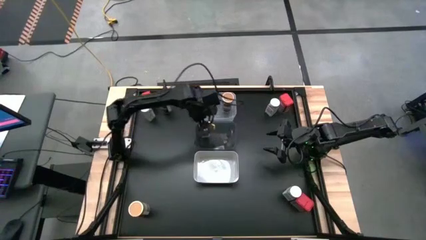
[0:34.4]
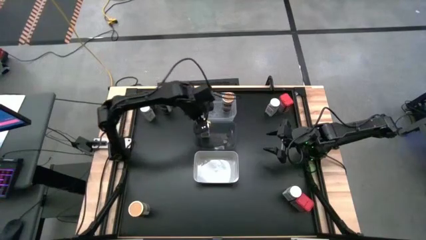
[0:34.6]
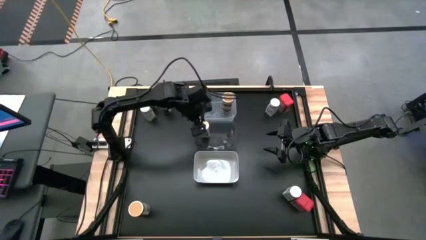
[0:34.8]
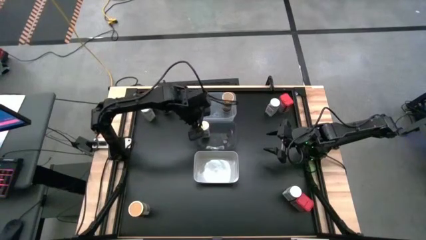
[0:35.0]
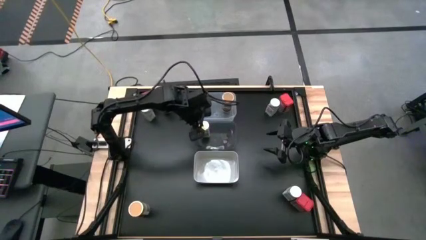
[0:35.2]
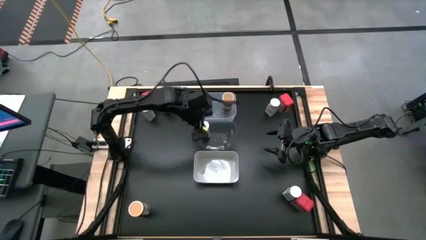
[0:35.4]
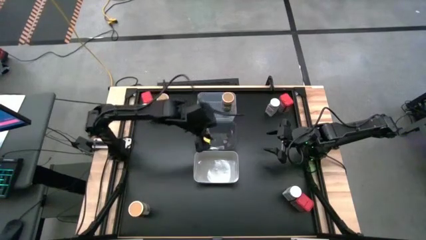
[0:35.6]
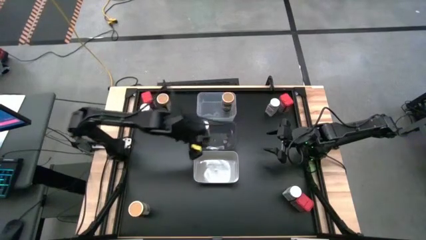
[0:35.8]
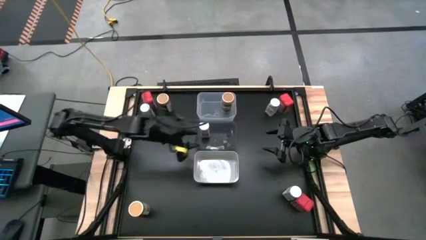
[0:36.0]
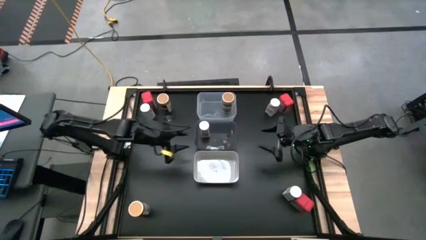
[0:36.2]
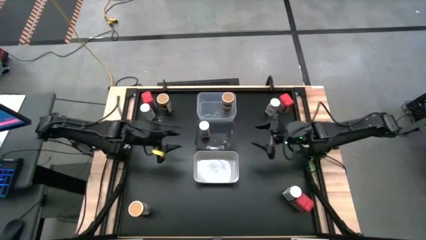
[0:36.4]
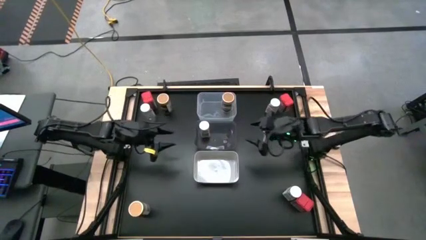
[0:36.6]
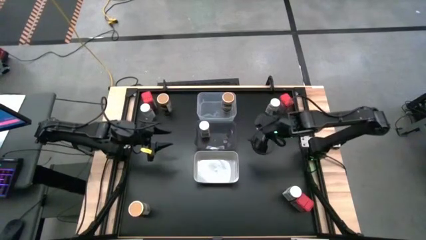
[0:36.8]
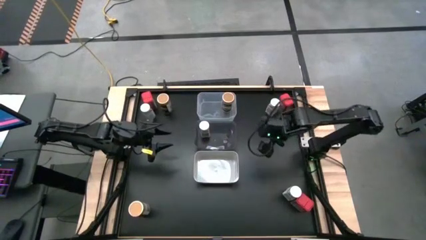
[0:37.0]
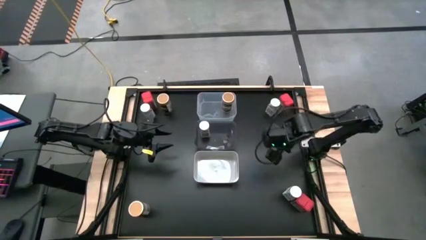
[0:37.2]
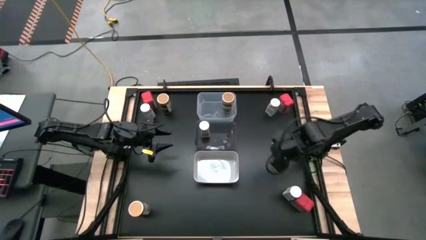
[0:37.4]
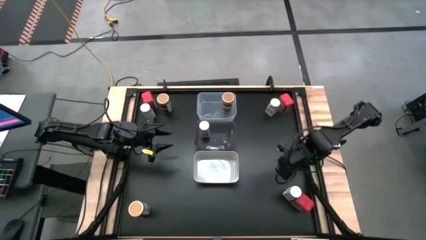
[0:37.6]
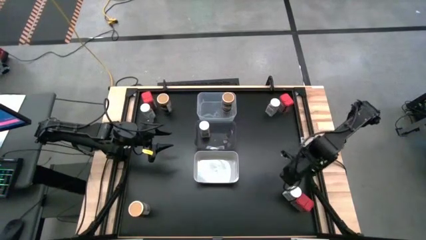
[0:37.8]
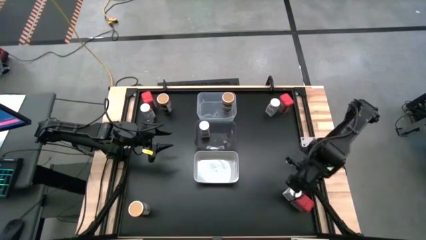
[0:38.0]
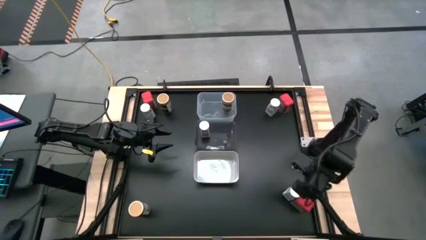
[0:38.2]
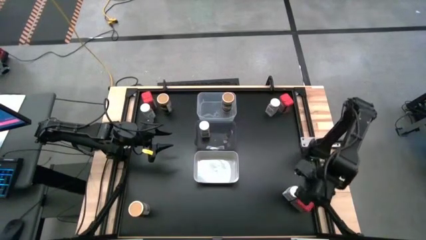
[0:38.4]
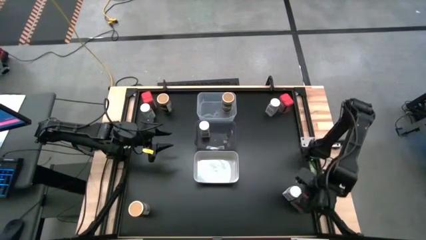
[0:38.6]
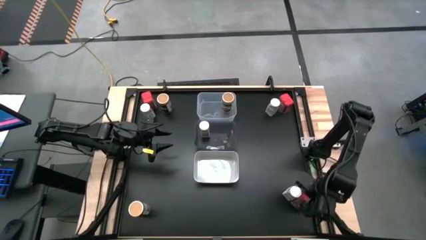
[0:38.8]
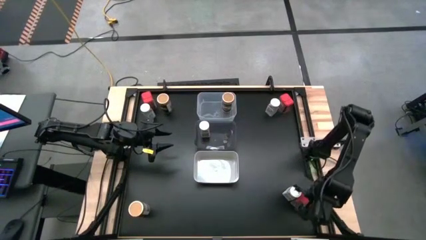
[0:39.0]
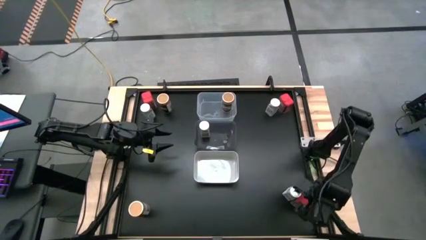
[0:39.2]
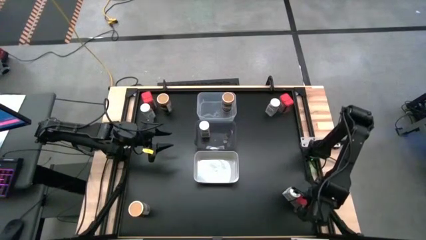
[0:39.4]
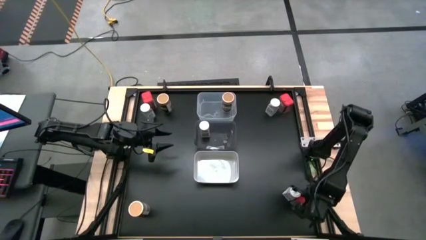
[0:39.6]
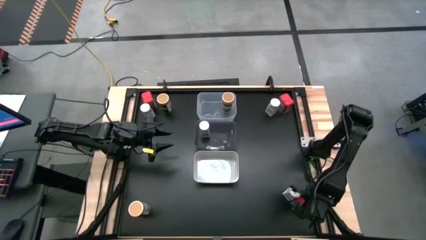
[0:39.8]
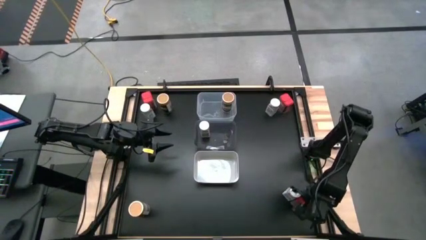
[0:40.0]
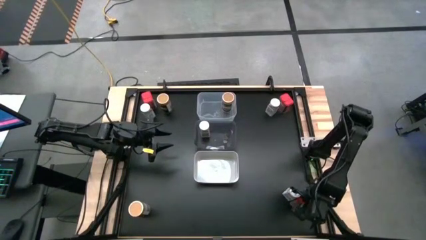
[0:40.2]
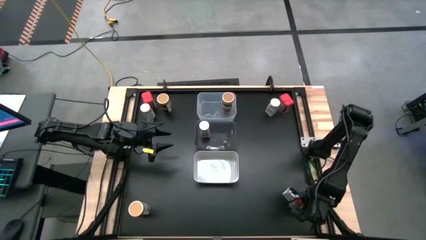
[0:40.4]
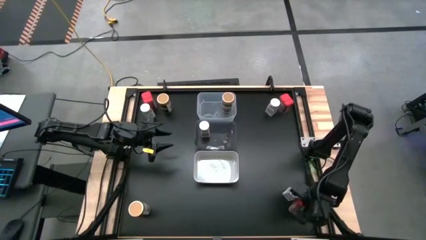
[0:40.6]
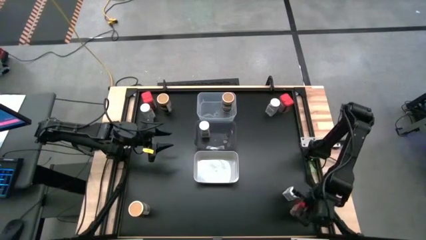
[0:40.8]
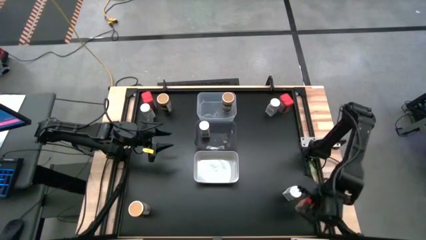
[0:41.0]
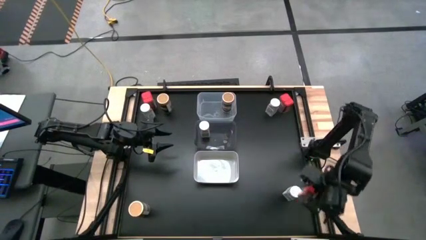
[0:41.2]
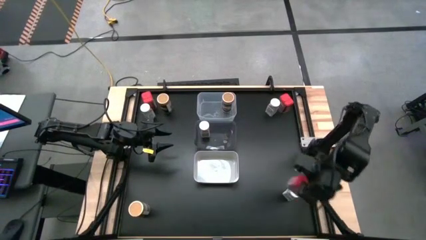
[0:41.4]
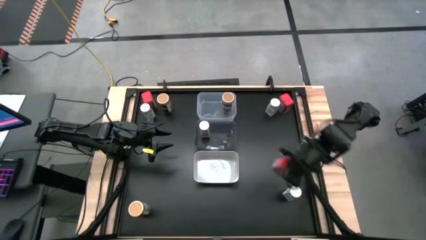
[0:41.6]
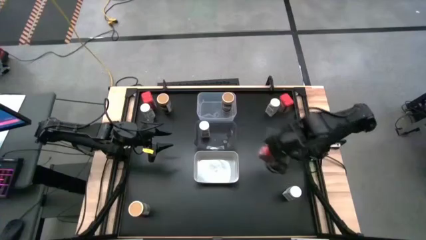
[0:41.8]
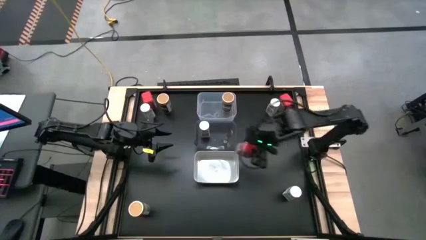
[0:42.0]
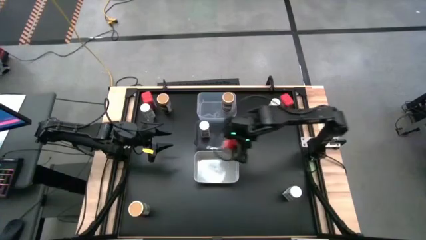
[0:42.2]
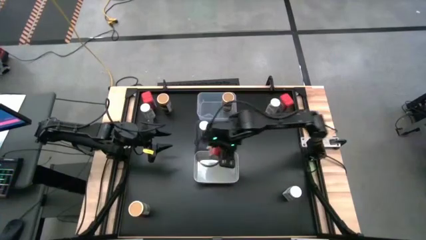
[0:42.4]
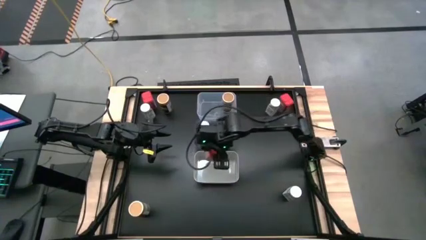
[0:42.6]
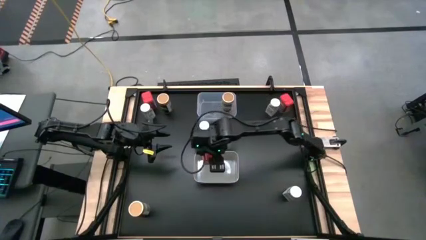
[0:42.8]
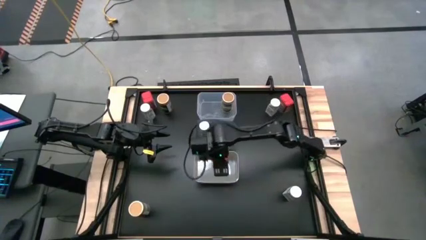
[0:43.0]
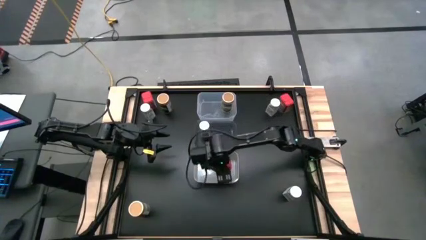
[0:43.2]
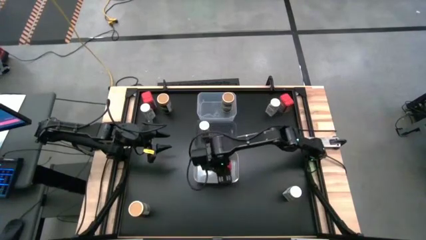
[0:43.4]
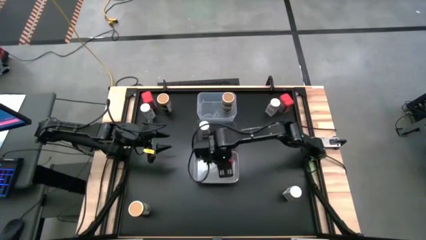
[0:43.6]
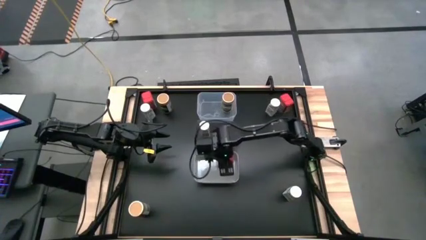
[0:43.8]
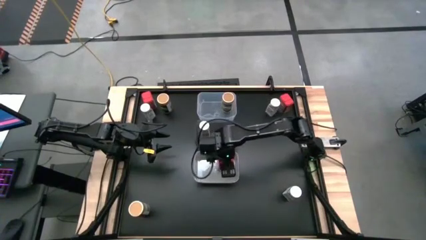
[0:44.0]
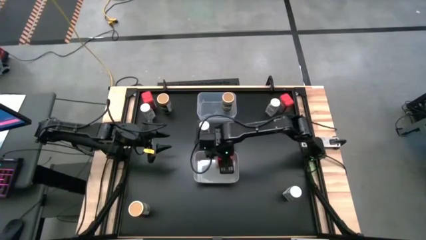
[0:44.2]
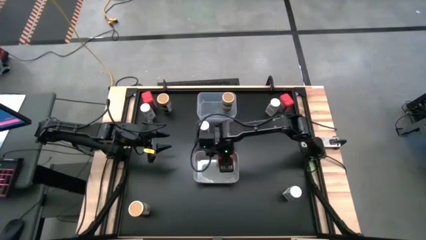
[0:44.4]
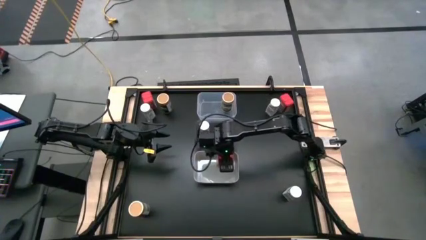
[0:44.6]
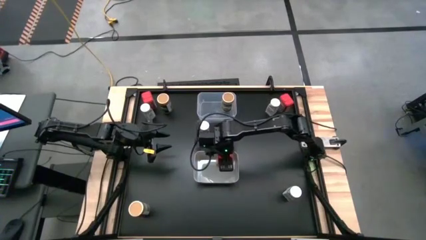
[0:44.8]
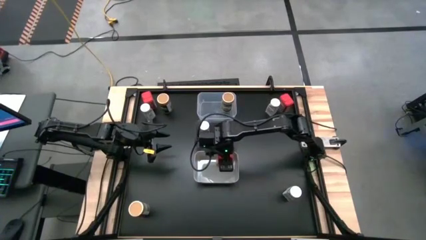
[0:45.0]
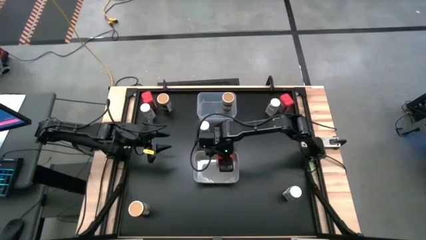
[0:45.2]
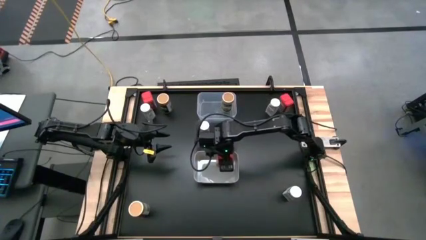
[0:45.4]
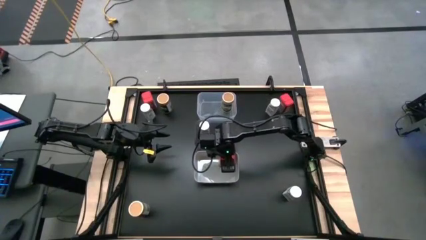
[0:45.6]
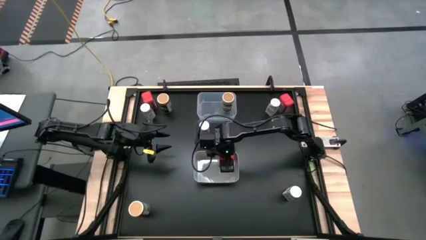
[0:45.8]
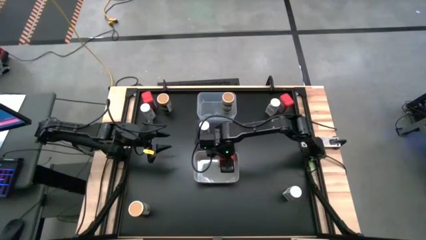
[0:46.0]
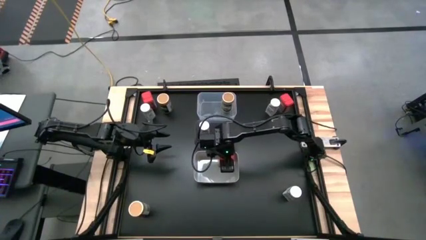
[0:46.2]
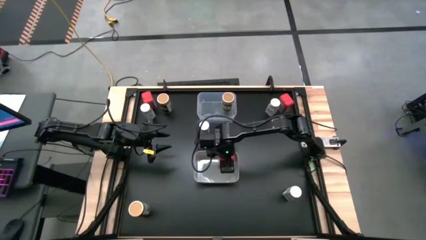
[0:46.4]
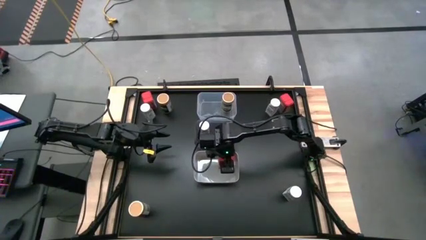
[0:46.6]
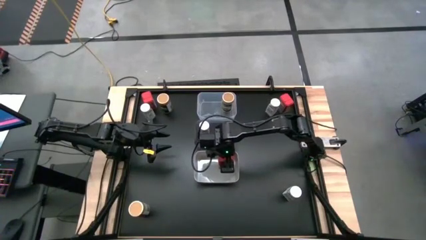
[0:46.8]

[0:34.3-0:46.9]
Task: Sort spices by type
Put the bottom right red seasoning can into the white bin
